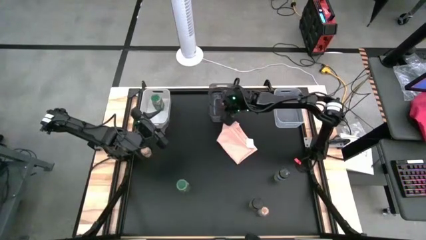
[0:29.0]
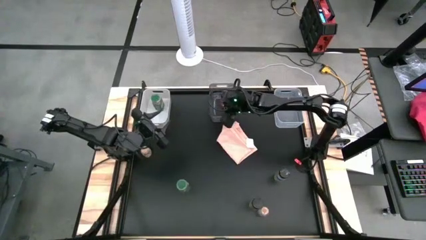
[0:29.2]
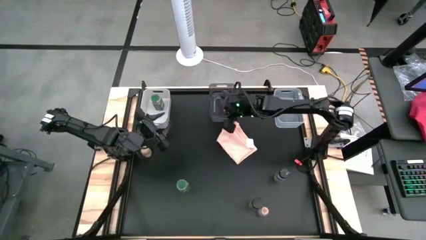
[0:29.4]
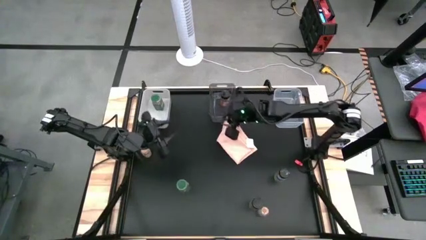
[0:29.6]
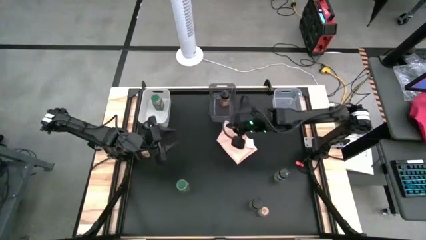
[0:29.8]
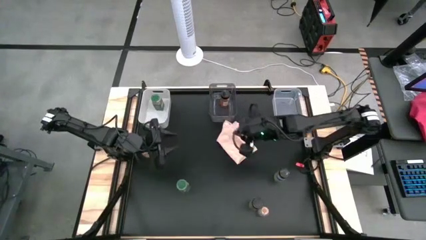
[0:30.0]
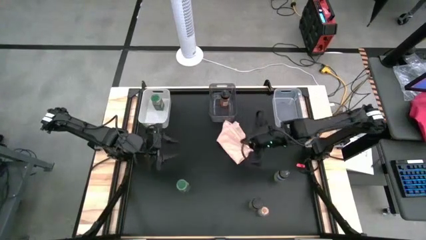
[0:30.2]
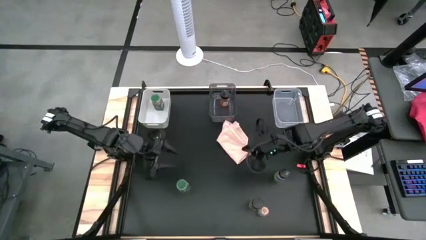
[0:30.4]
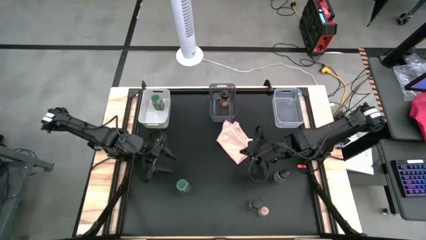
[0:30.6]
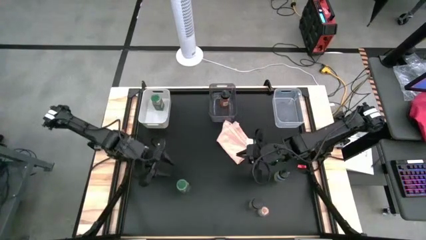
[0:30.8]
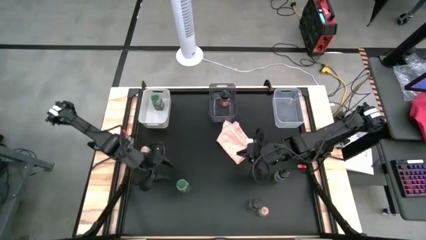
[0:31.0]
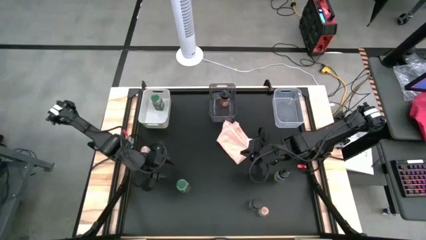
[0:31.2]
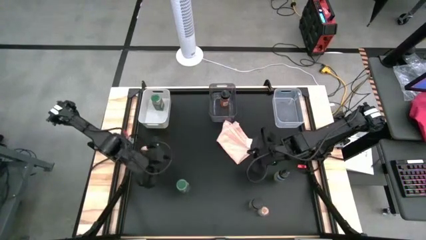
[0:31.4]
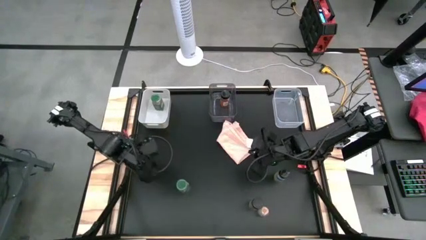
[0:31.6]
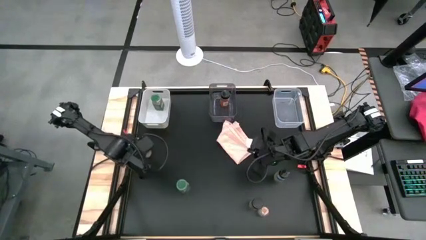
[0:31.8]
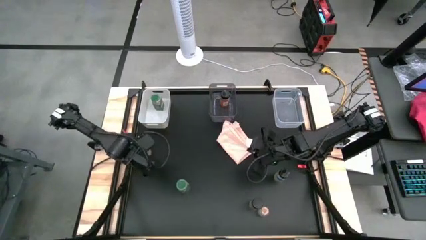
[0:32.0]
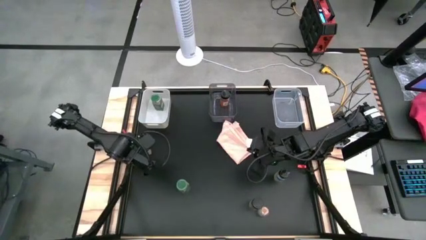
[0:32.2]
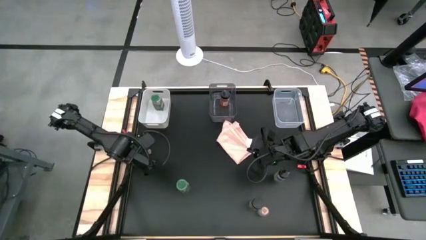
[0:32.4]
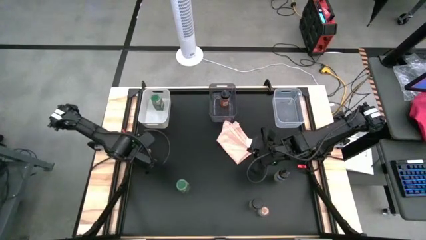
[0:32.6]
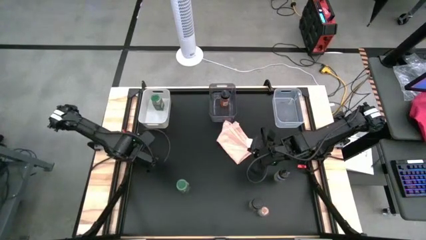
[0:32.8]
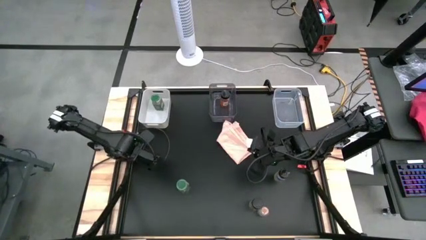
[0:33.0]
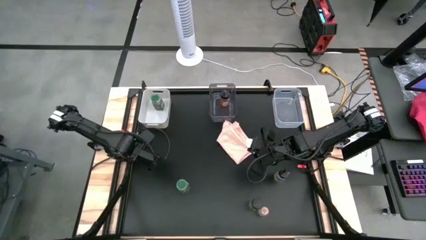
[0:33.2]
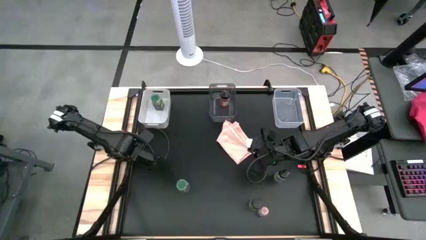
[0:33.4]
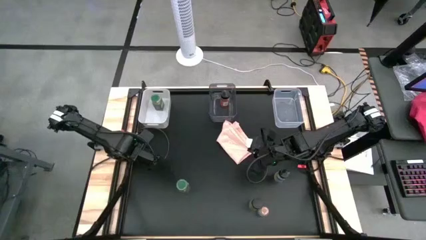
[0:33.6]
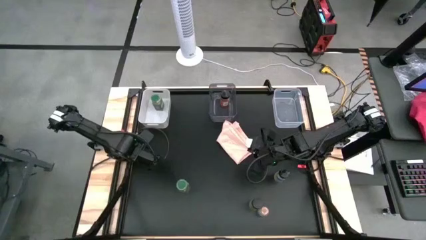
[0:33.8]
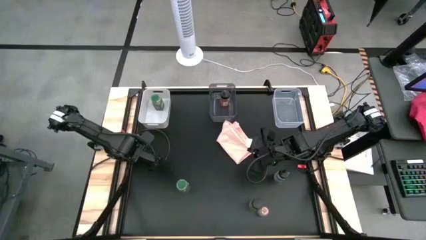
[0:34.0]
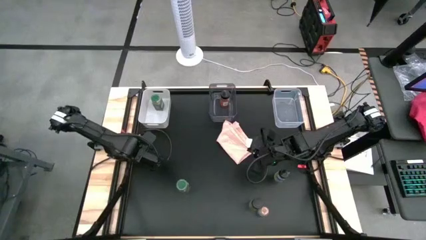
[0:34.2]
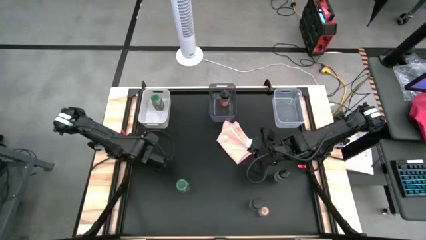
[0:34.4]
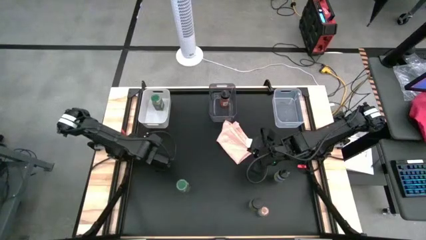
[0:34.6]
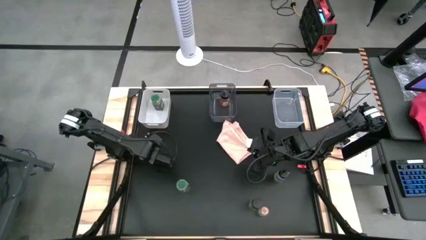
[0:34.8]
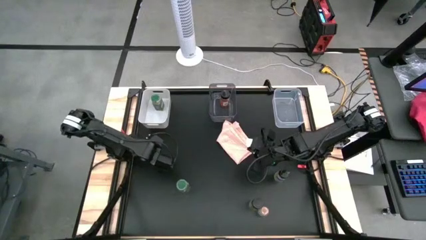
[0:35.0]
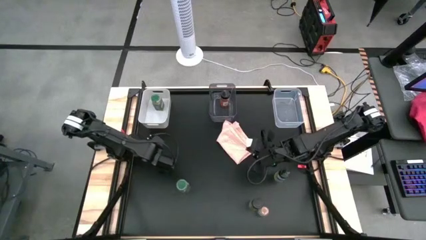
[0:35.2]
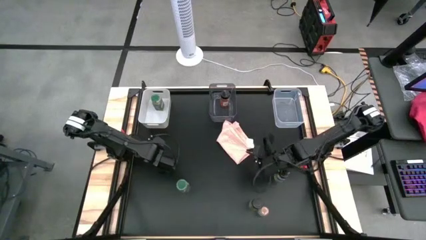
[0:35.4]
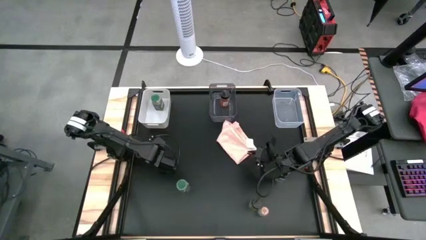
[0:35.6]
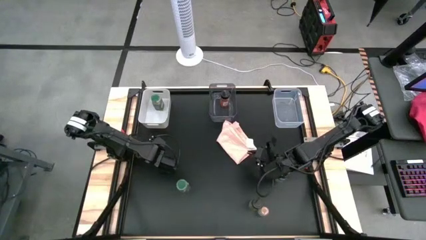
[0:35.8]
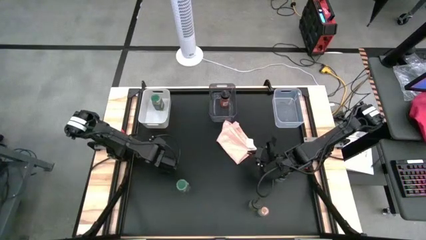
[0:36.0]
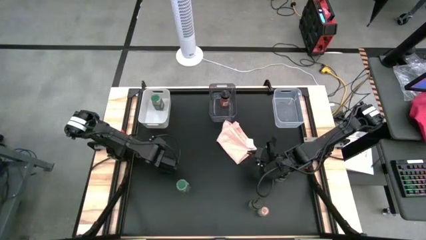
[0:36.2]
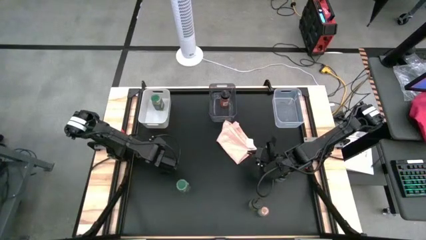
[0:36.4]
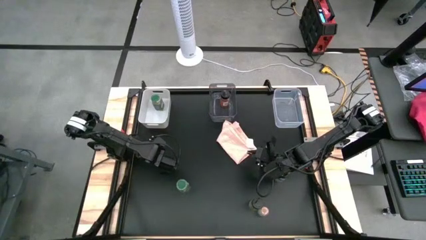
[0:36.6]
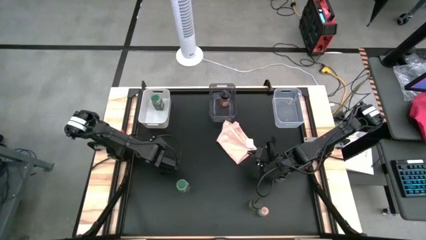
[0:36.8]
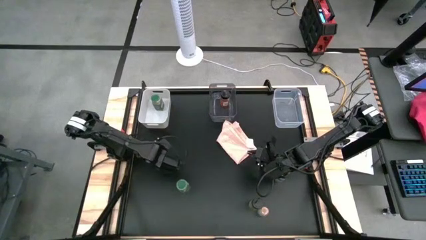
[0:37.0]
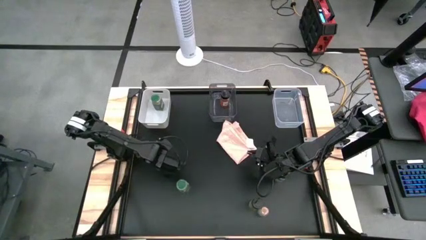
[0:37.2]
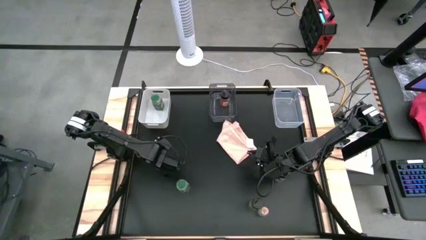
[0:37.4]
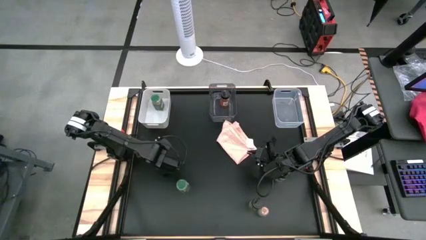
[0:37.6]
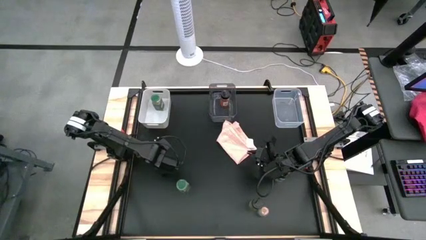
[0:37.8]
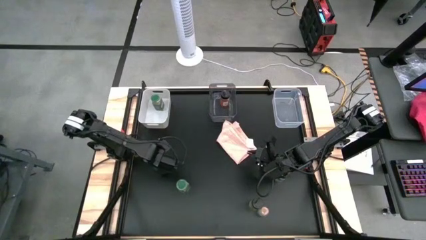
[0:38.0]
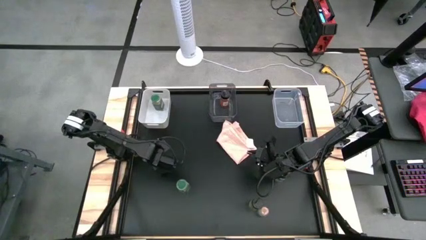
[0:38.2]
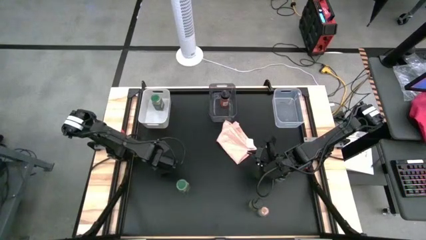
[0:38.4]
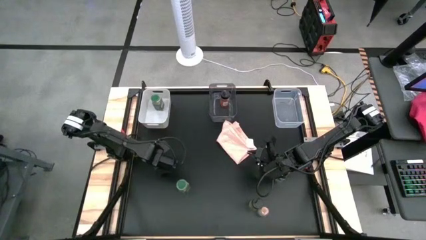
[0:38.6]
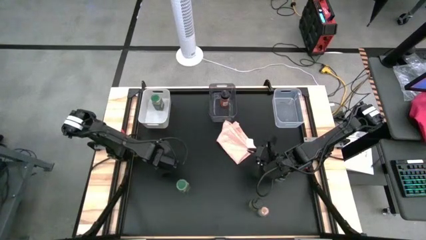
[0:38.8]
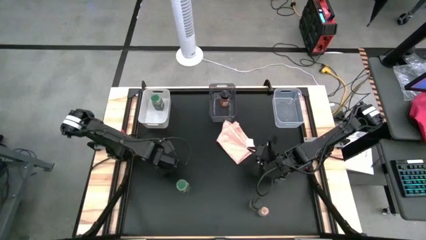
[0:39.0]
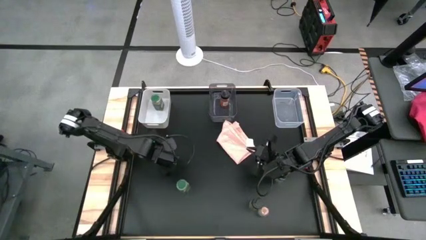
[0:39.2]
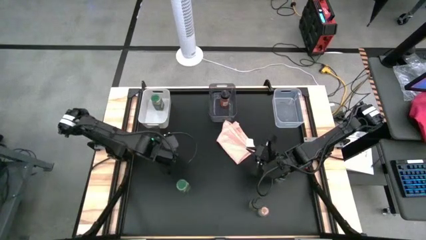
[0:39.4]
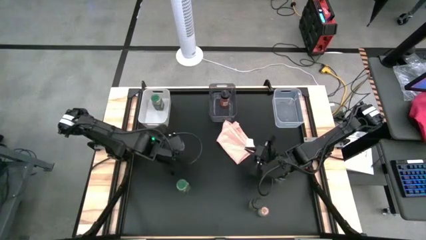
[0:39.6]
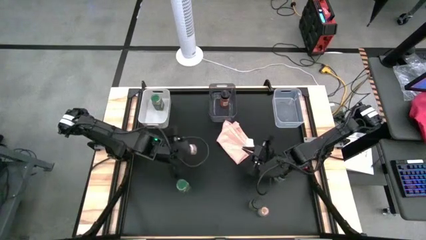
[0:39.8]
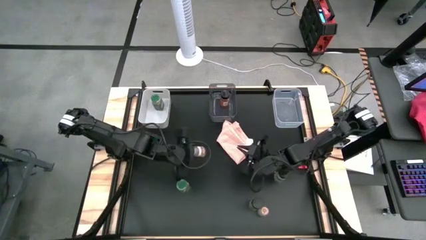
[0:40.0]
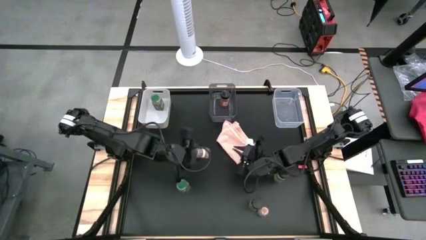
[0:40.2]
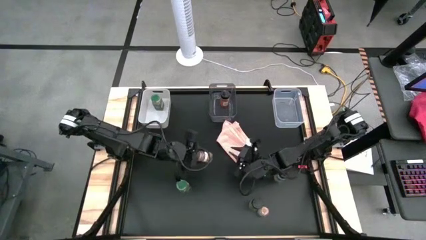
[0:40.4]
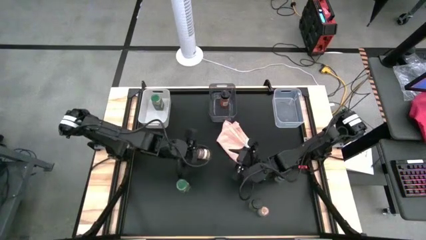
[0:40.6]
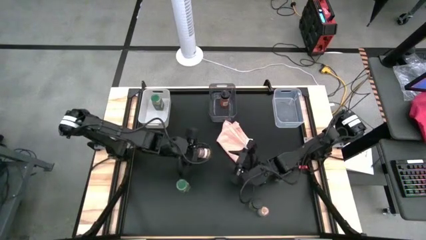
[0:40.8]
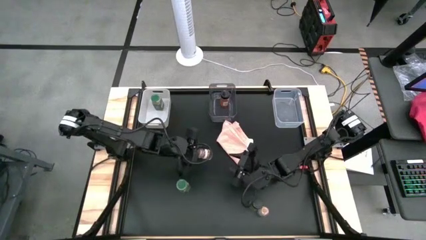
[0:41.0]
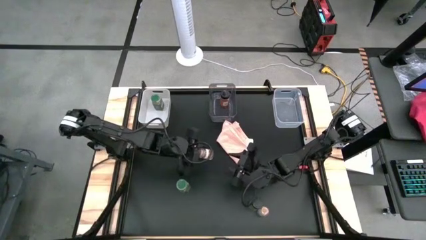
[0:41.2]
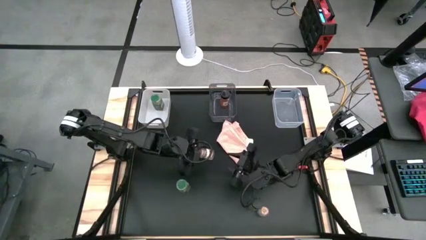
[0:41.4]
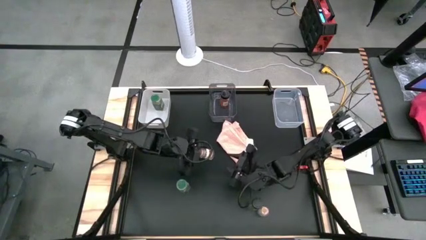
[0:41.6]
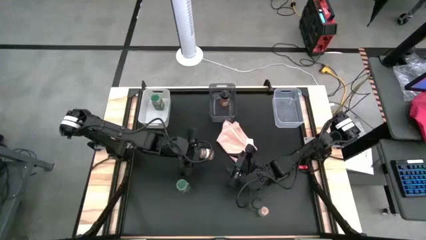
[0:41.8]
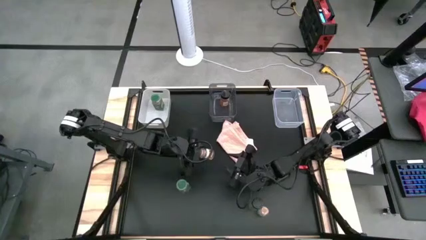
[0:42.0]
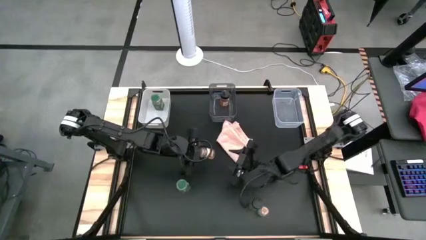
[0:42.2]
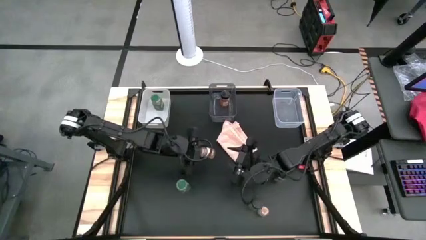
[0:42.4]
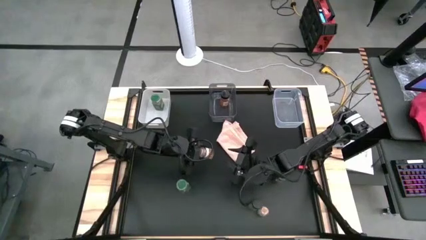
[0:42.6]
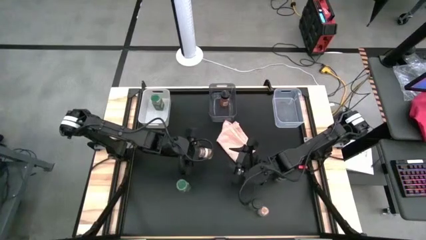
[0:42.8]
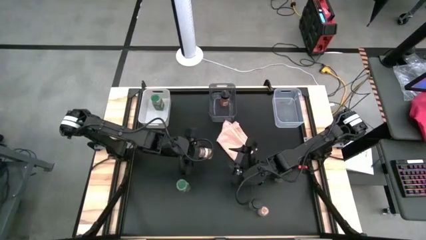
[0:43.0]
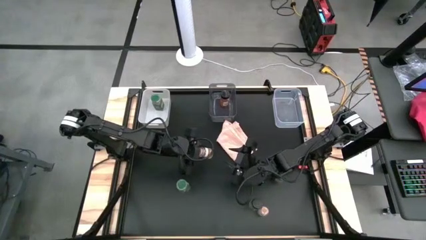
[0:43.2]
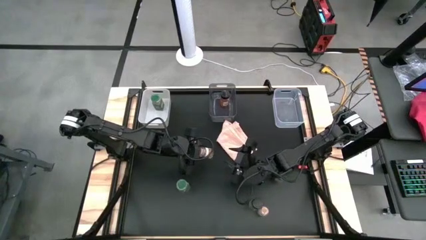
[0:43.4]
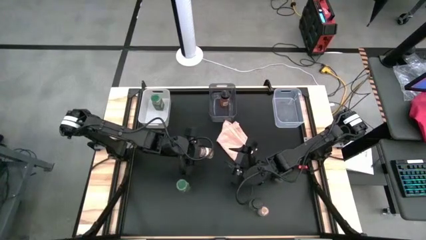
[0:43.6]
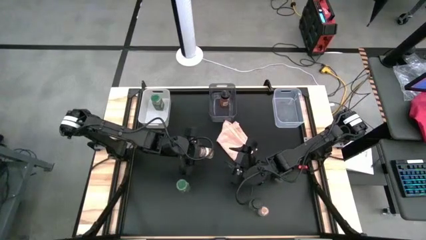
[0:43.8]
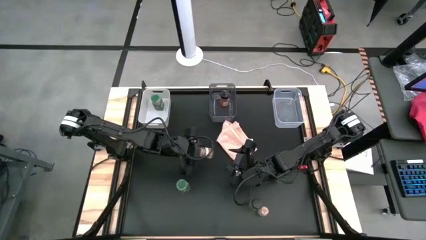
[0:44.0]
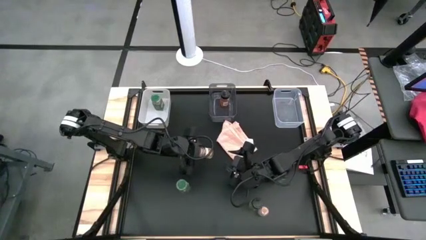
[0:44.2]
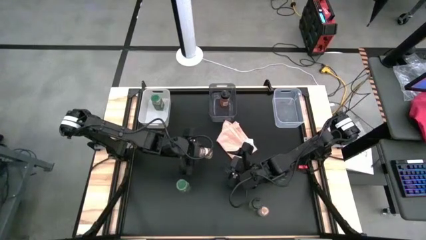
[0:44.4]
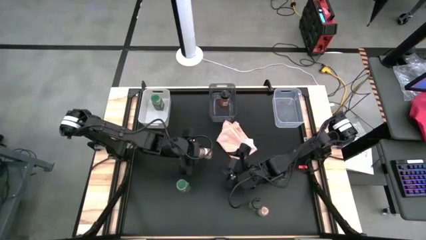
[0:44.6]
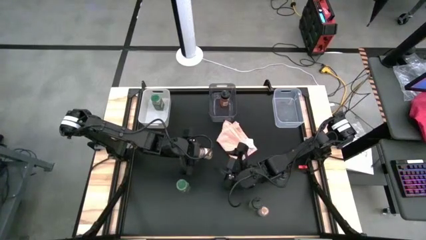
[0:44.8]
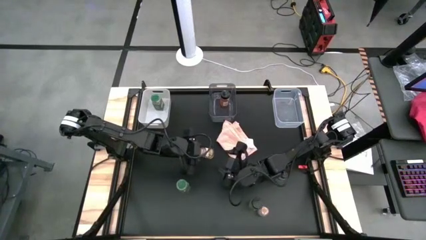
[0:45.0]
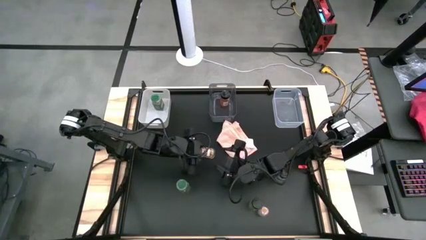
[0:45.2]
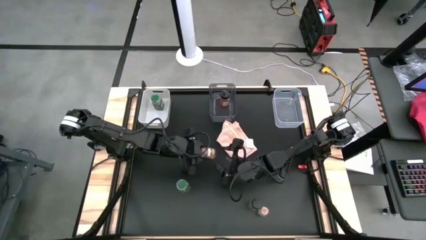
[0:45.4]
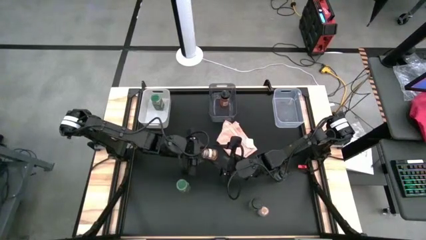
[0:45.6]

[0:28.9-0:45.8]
Task: Sort spices by type
Put the left brown seasoning bottle into the transparent bin
